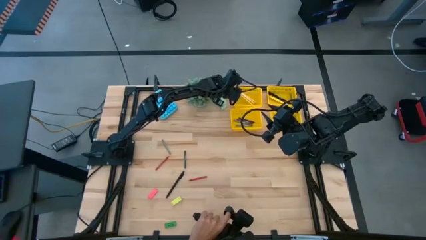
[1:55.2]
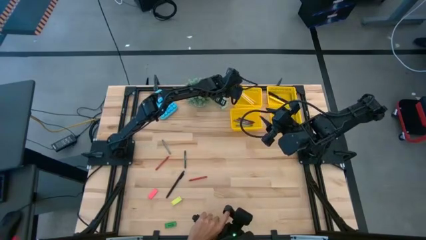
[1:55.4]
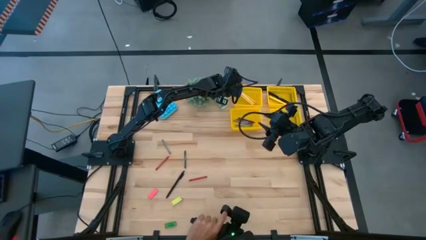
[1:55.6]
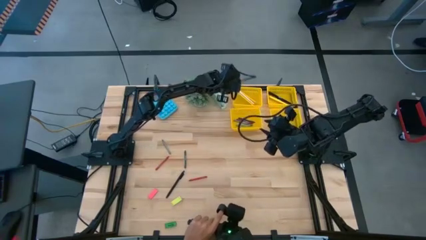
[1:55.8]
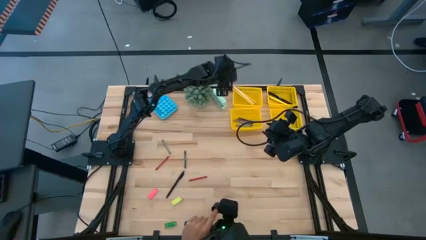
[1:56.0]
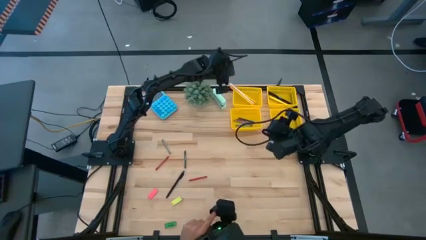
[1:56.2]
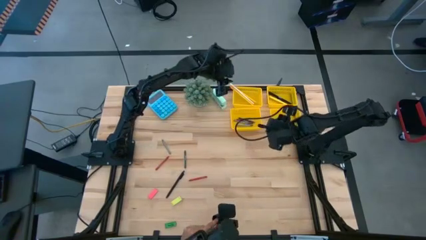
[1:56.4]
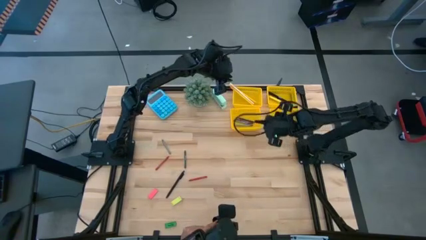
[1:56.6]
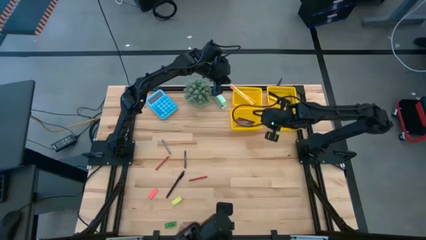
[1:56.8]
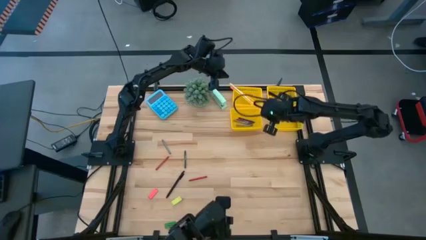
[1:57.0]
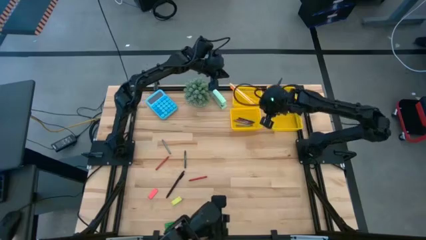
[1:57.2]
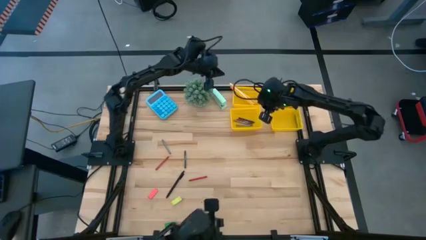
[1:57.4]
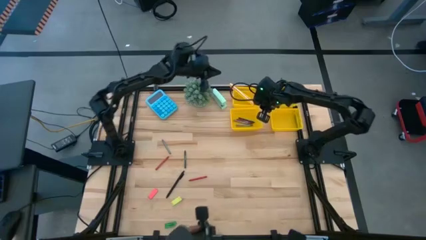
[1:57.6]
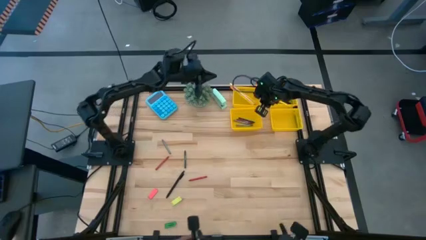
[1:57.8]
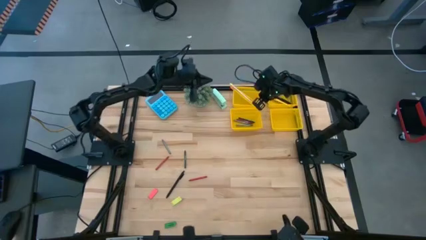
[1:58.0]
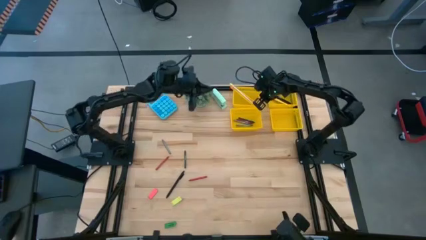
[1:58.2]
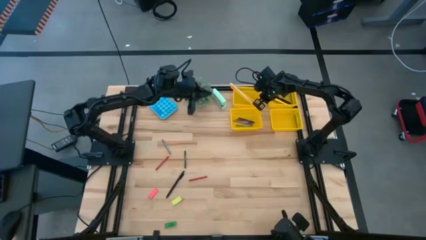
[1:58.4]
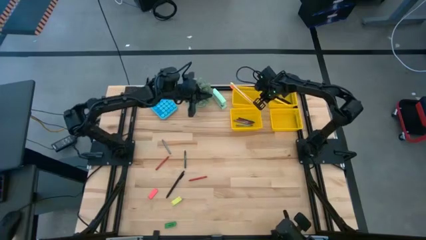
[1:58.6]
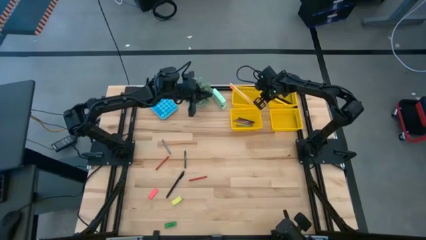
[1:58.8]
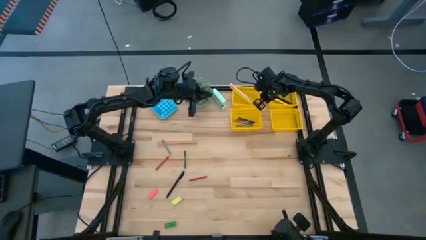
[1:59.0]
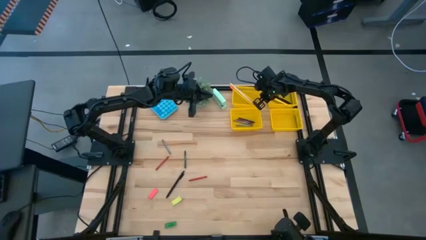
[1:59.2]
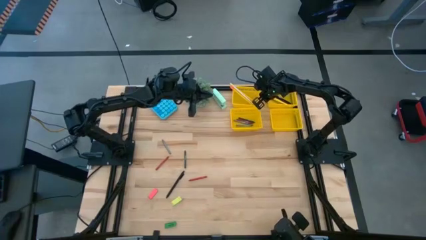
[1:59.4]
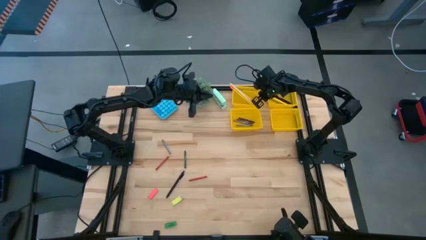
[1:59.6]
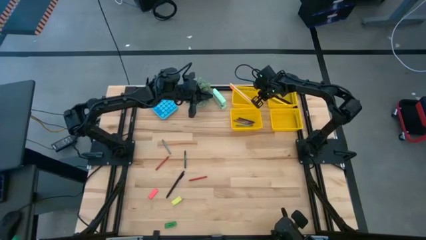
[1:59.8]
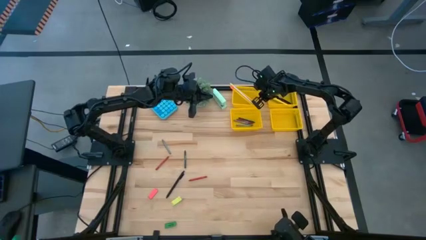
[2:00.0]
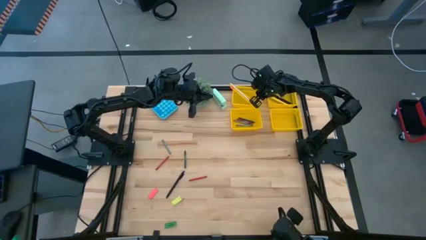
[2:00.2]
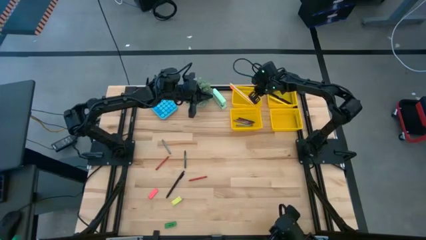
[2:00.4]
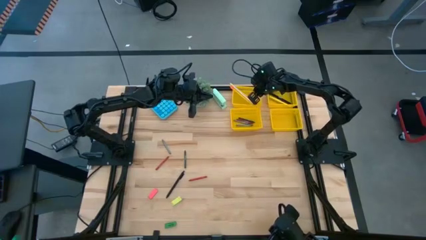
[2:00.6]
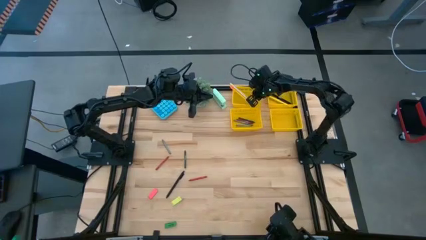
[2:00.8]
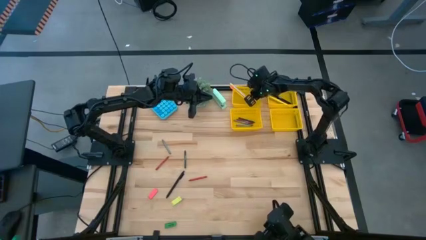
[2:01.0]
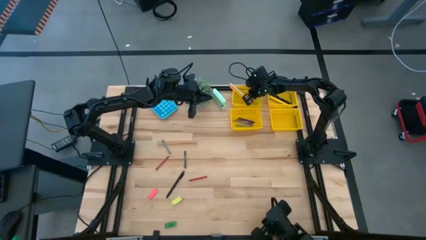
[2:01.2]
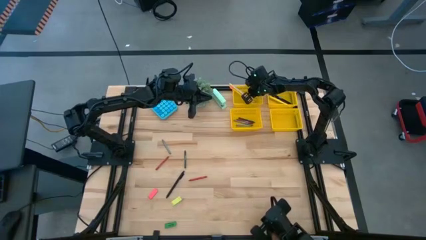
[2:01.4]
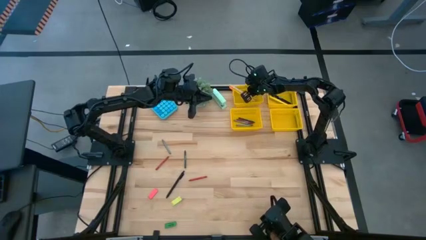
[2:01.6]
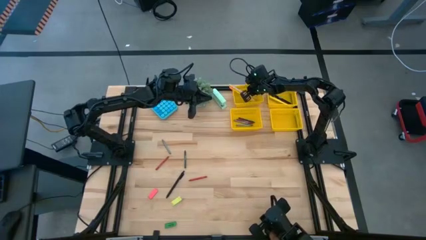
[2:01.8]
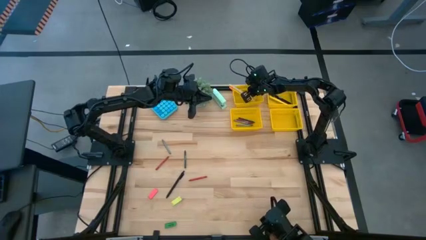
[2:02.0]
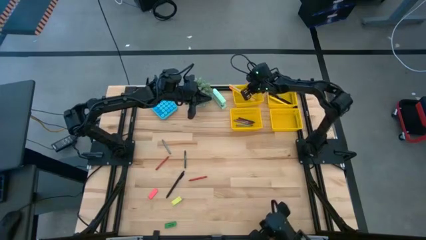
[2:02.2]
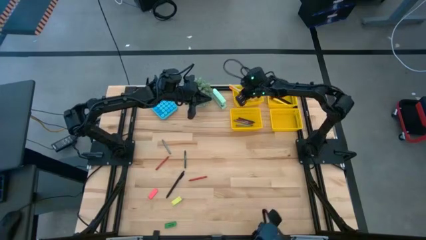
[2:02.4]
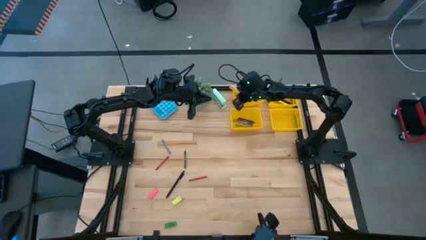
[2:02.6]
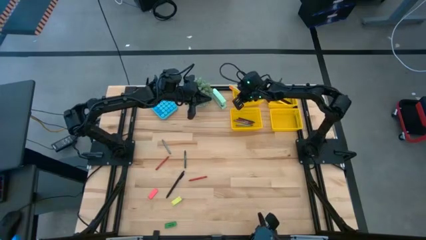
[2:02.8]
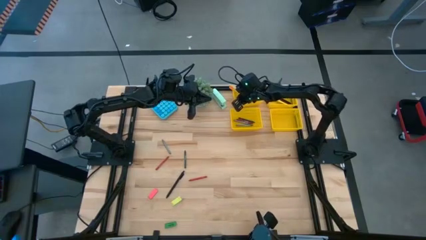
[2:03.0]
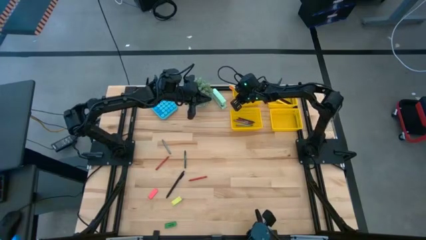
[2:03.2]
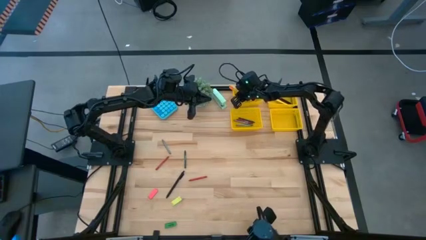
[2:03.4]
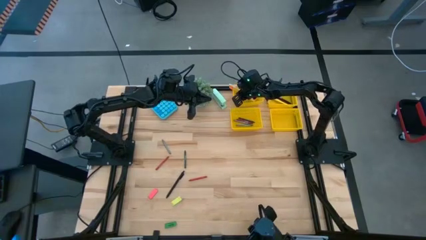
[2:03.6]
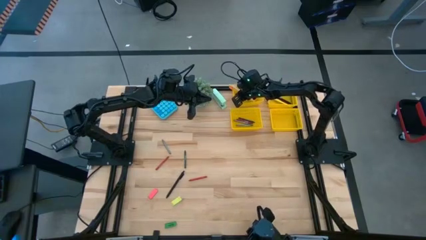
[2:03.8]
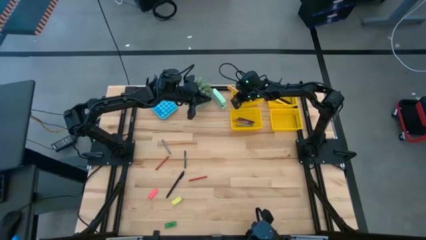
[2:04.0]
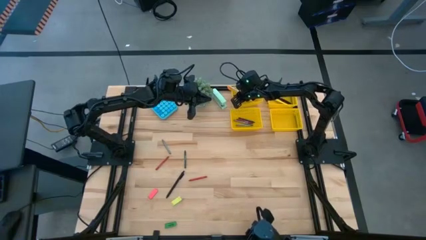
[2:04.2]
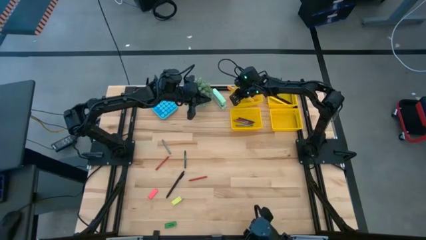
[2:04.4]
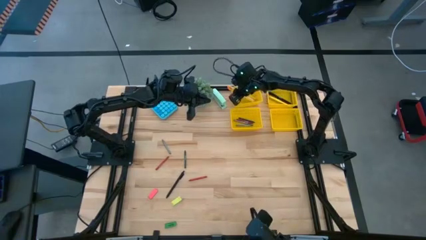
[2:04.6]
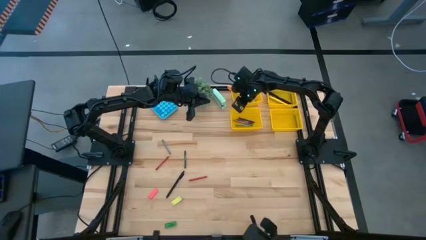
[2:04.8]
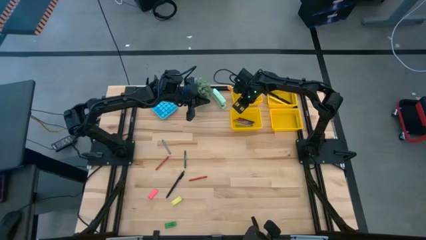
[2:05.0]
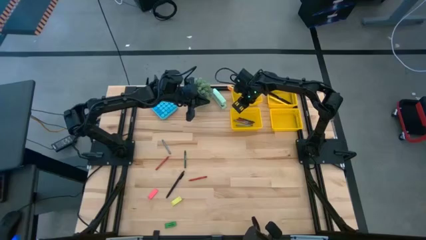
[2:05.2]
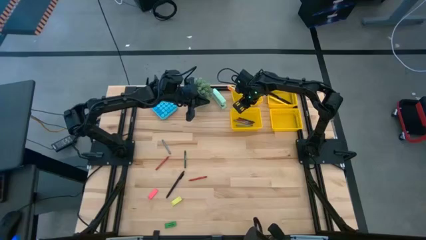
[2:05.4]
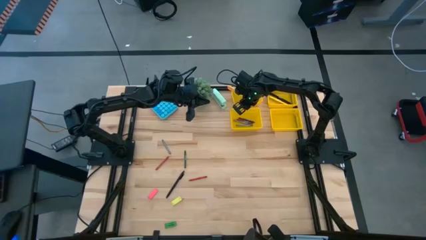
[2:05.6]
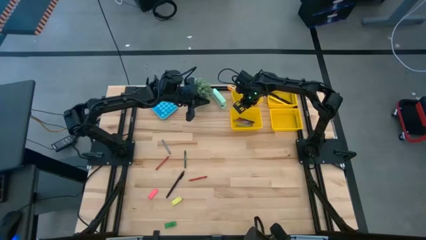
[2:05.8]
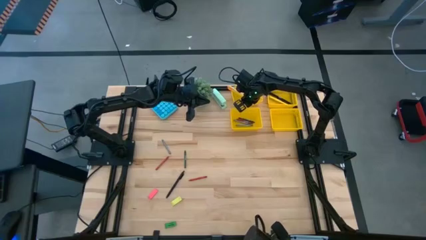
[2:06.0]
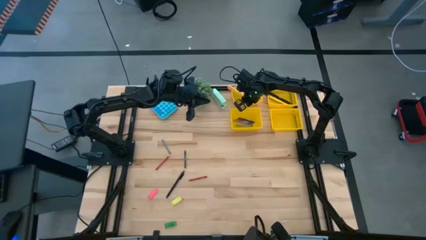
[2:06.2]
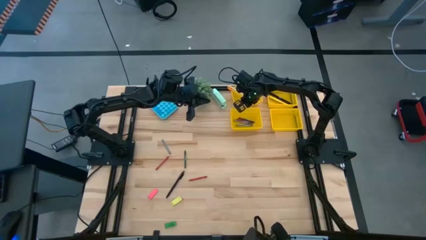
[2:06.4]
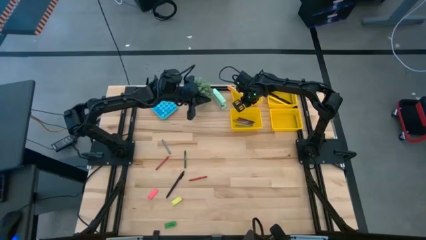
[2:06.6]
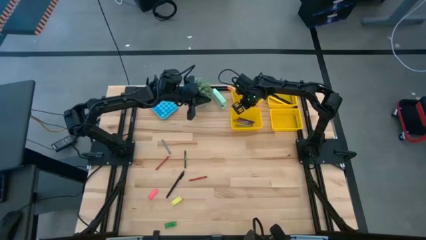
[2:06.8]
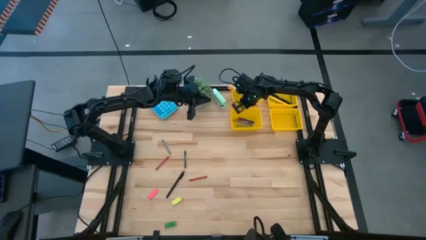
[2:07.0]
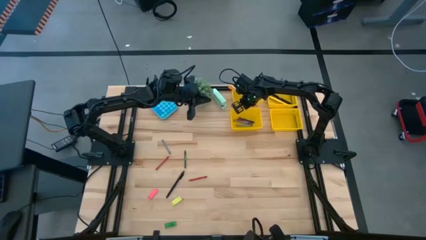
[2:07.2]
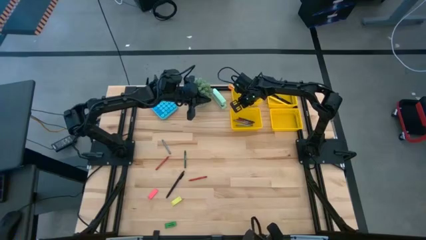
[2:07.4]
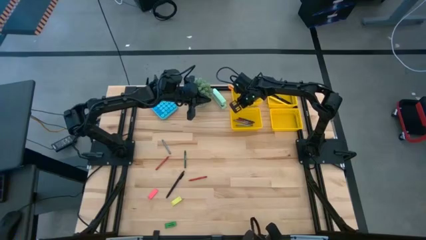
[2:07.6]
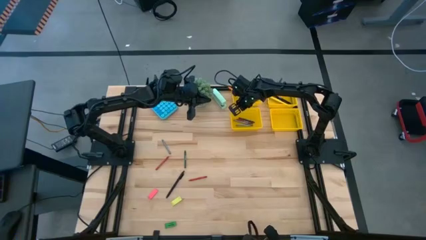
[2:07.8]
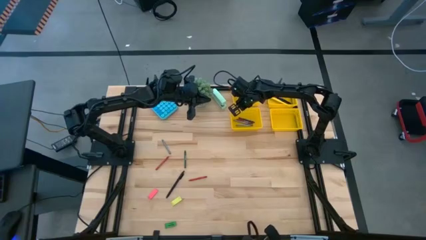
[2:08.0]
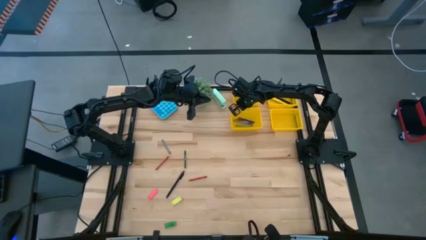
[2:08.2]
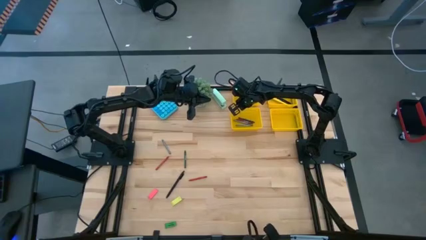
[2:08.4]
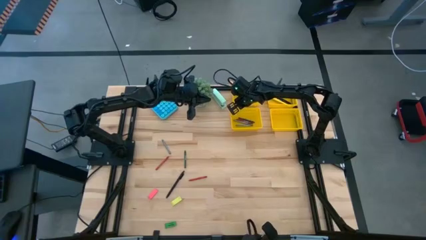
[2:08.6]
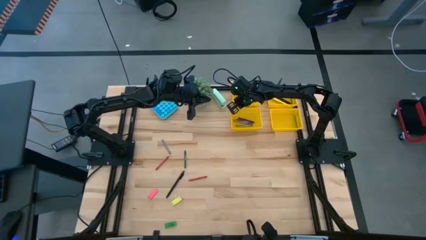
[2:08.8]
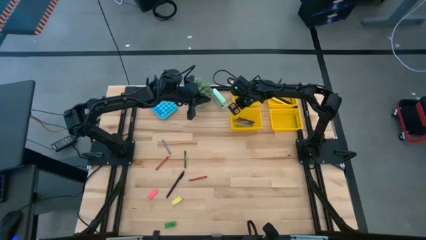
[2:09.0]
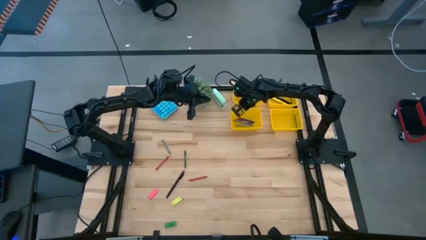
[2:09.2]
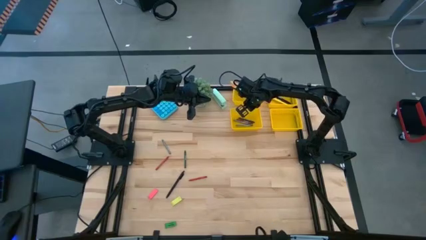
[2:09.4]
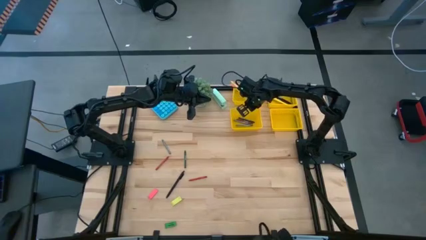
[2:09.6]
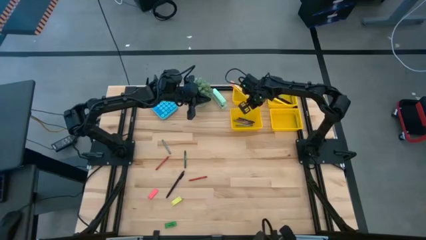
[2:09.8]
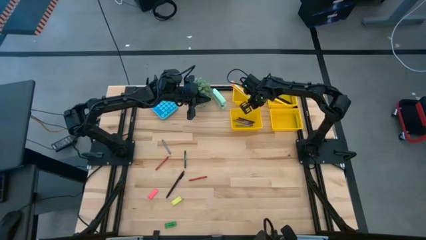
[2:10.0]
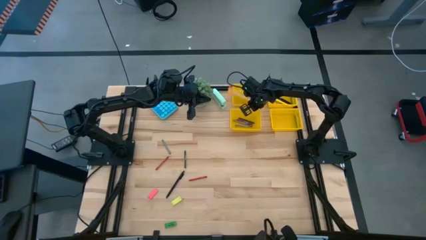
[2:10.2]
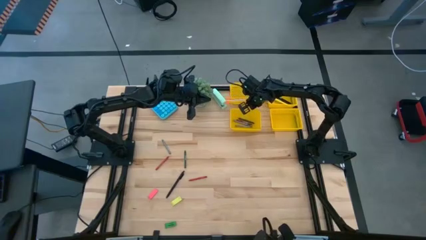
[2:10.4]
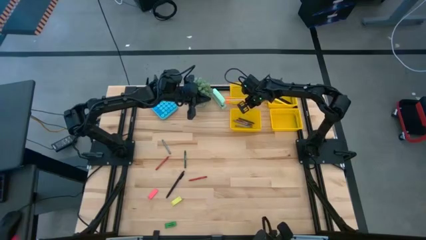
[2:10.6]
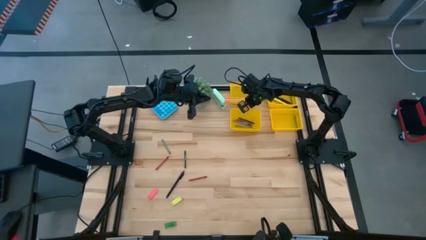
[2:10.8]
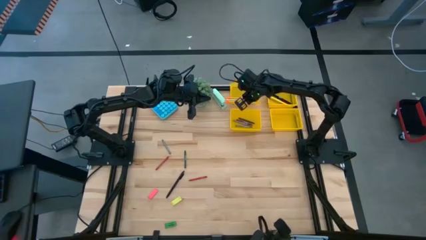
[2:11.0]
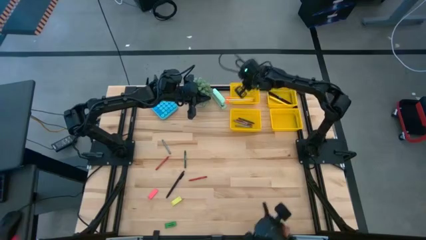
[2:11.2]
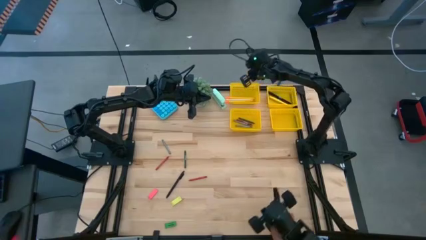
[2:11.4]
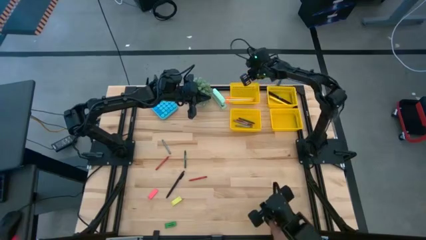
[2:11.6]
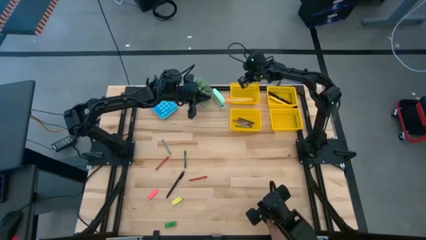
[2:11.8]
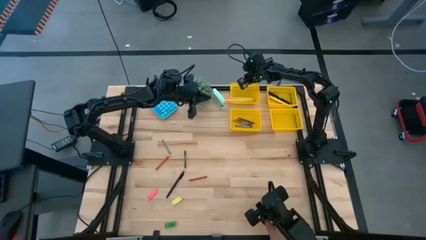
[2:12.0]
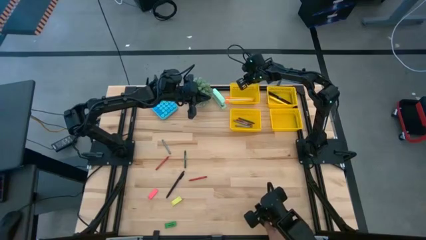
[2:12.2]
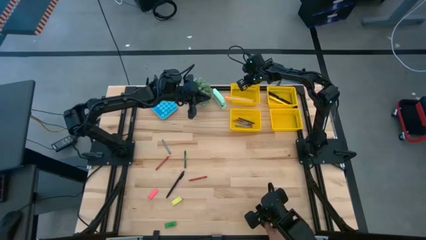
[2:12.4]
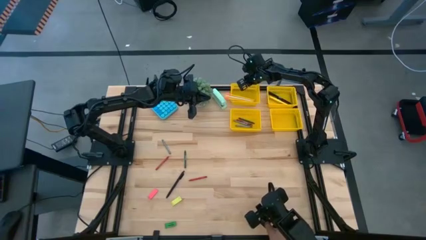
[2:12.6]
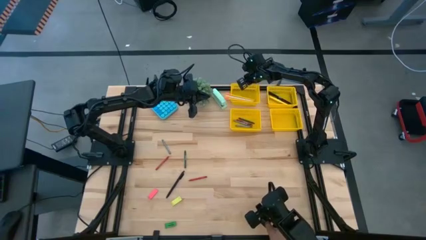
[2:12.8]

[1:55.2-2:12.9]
Task: Sort crayons/erasers/pens/pencils in bins
Adjust the top left yellow bin
